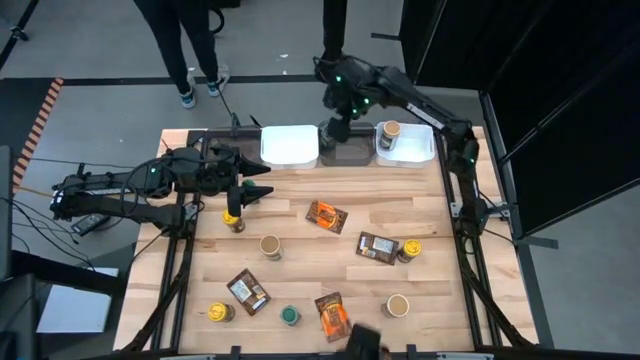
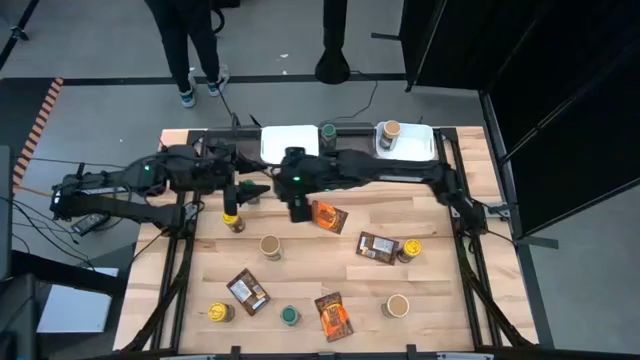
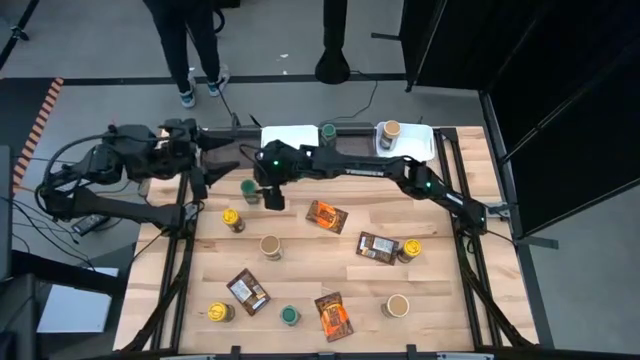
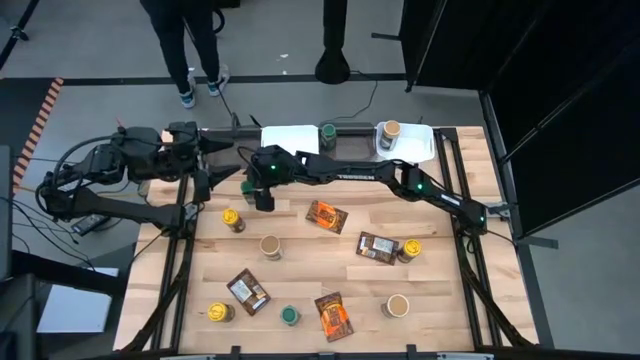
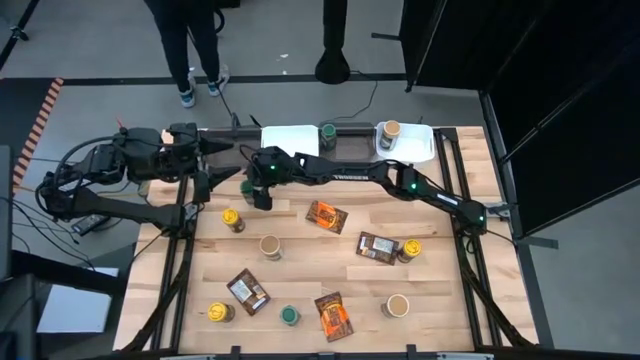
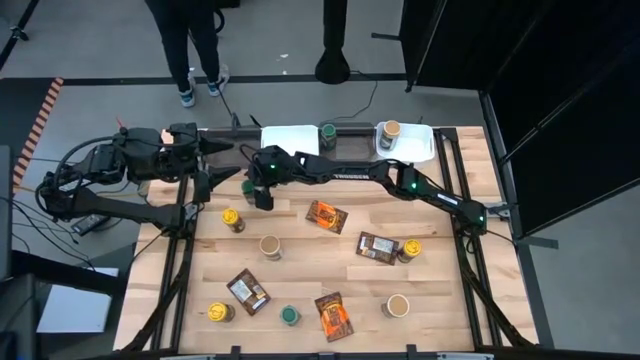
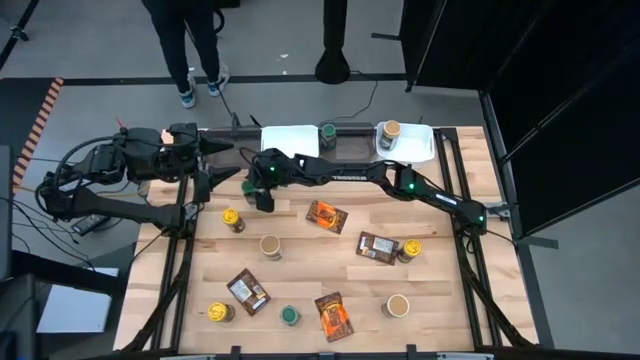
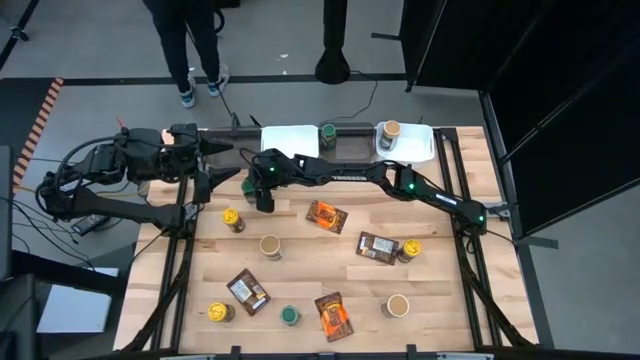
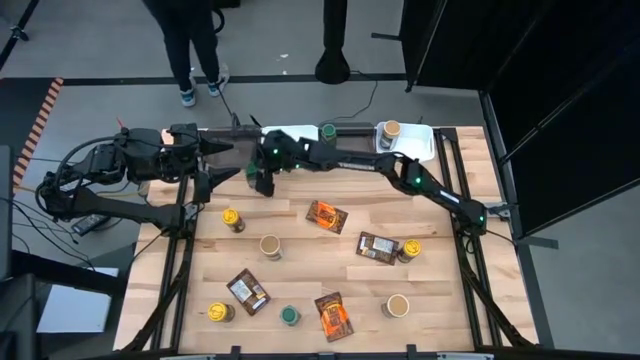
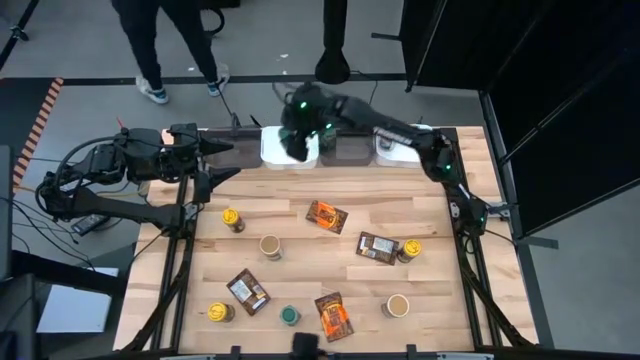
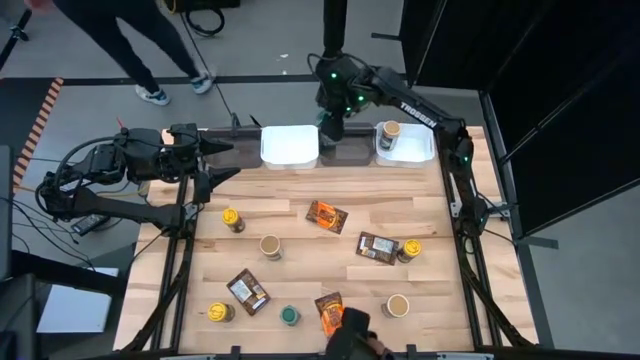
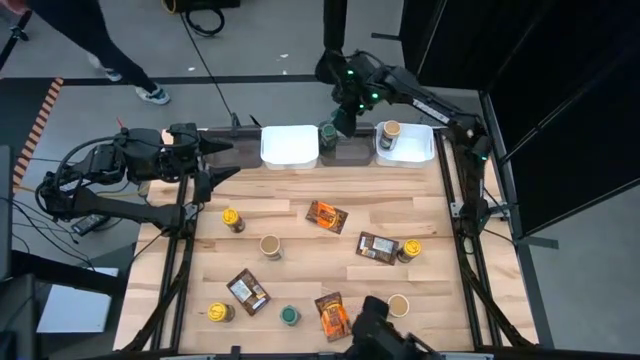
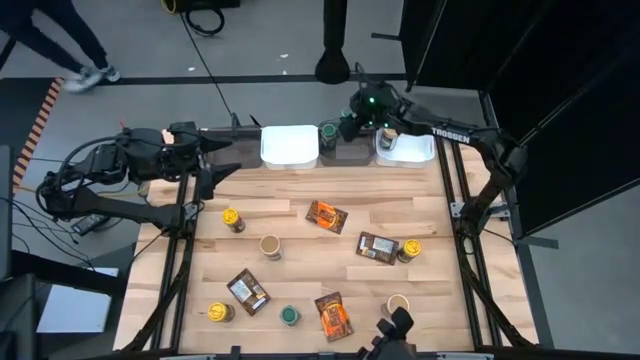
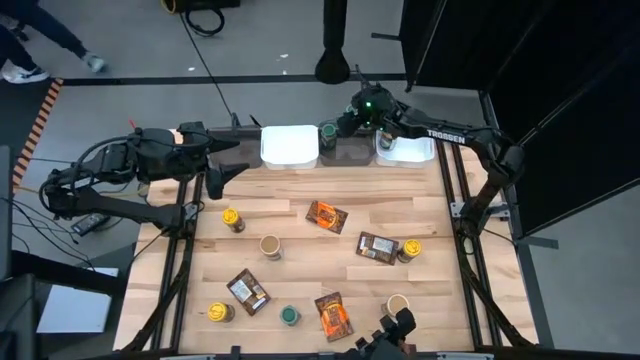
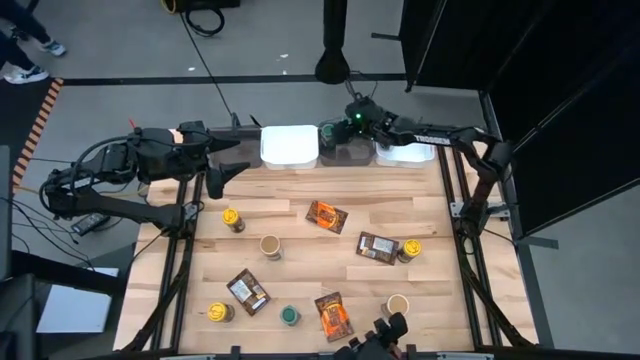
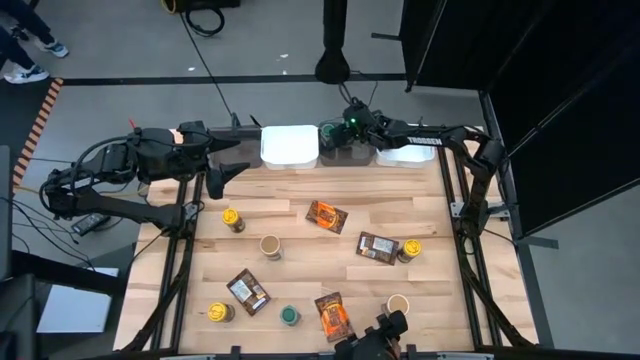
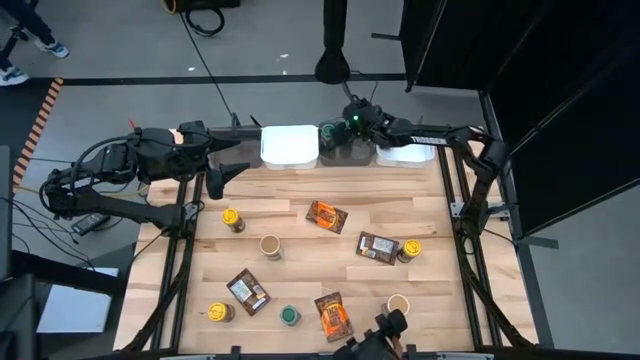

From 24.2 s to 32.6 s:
Task: Sort spices by type
Put the top green seasoning bottle into the right black bin

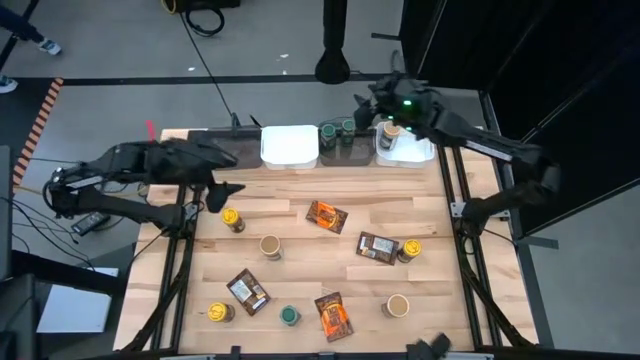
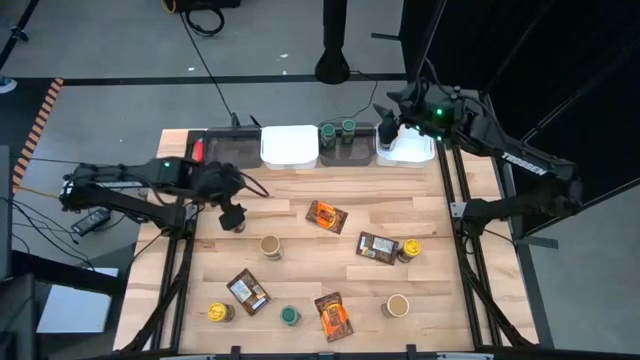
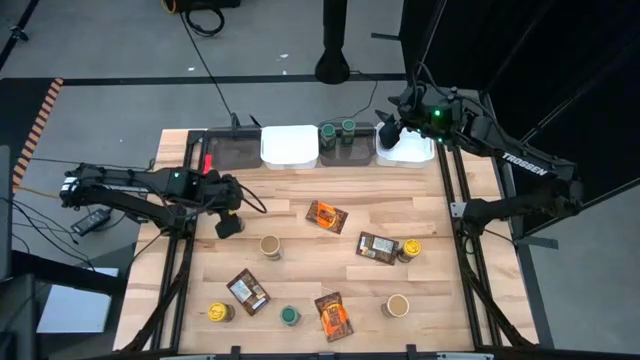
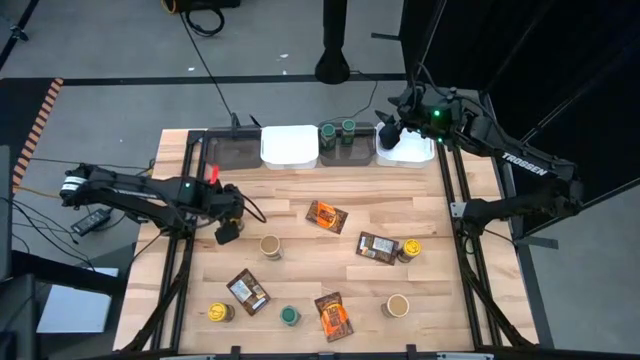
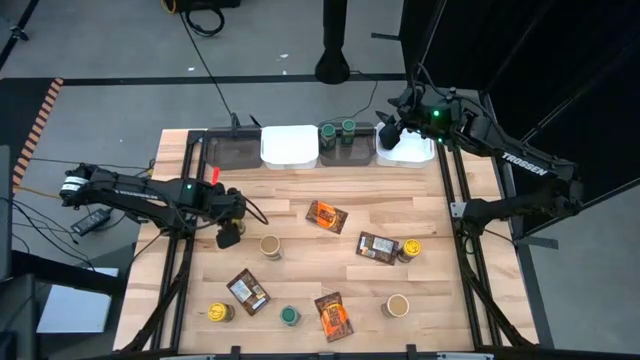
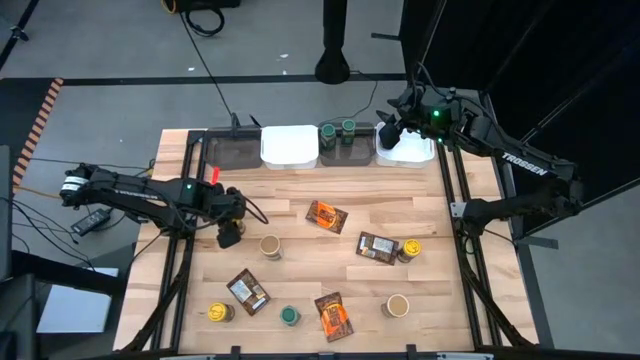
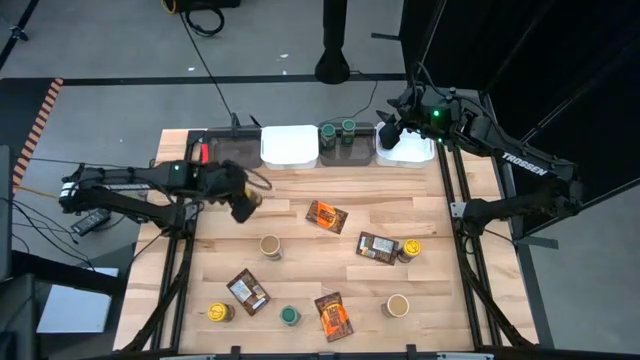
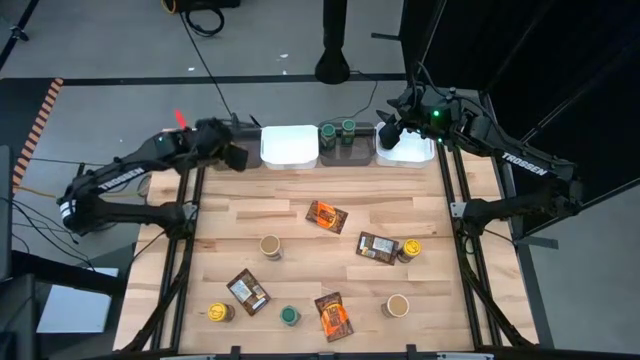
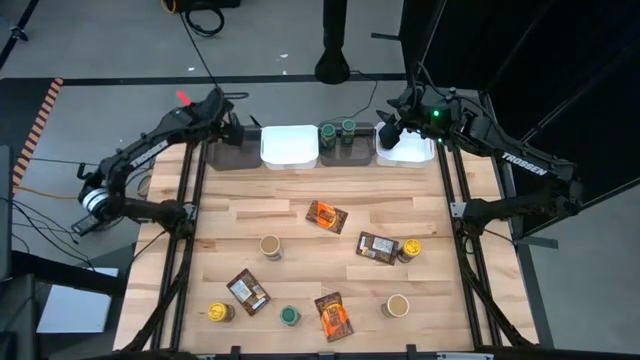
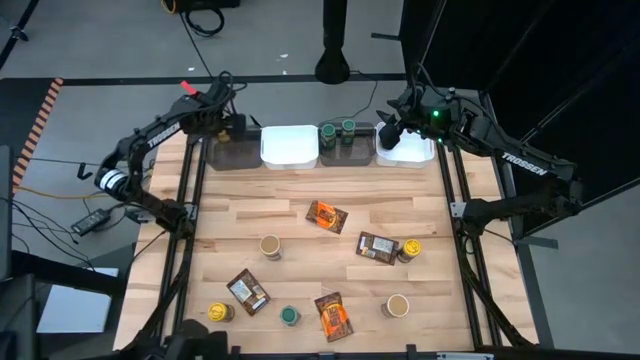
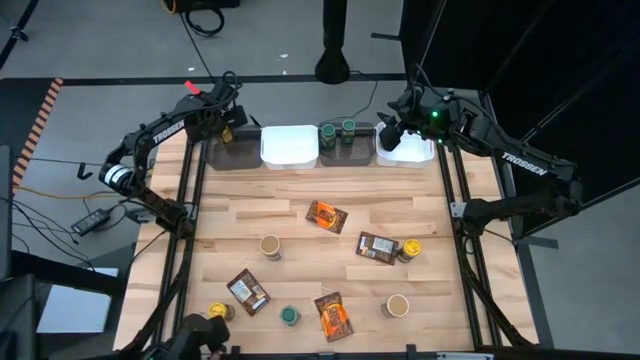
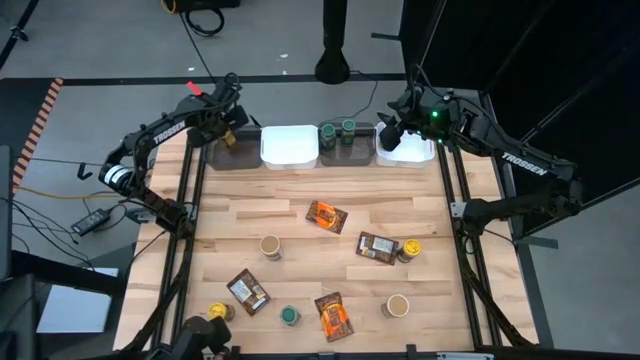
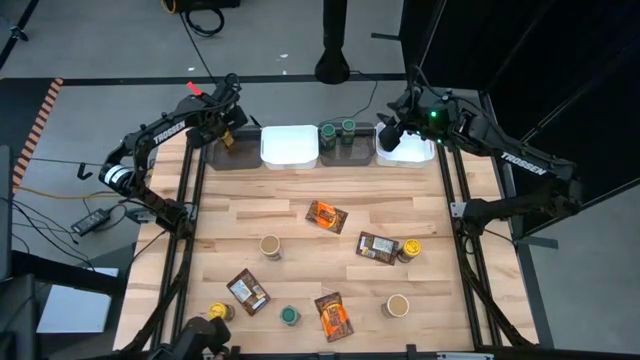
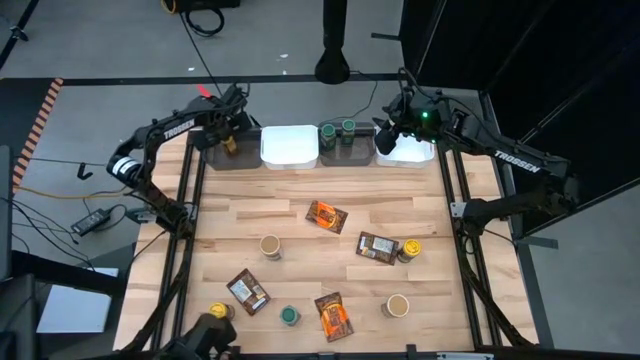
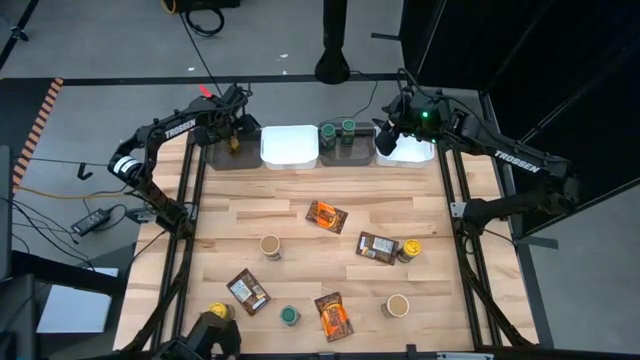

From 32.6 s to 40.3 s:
Put the top left yellow seasoning bottle into the left black bin

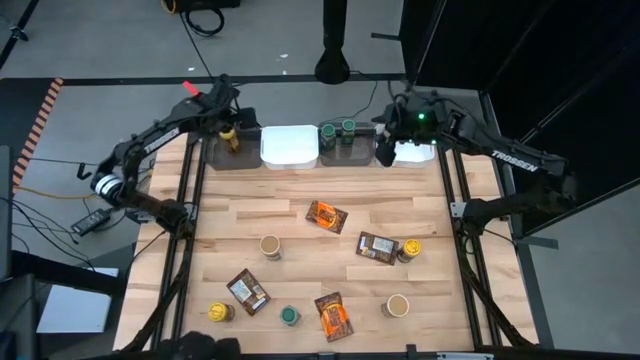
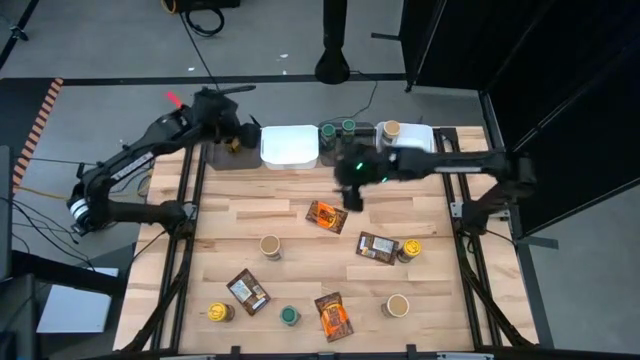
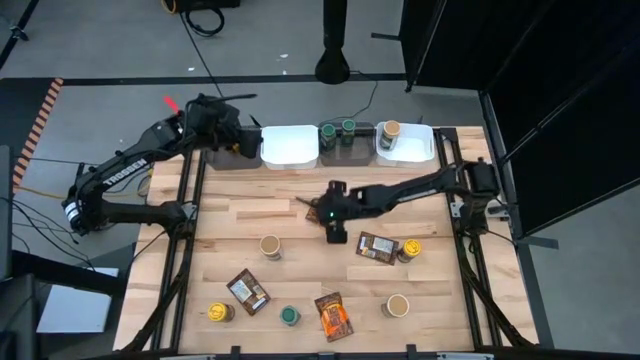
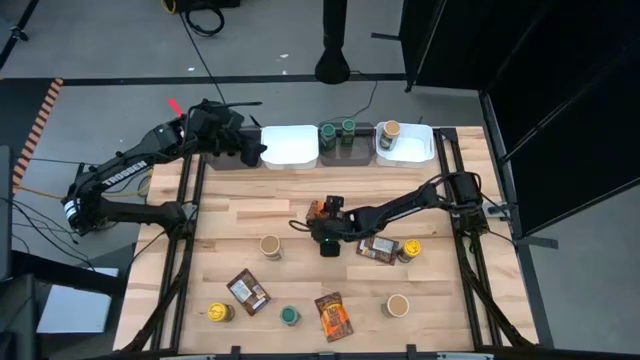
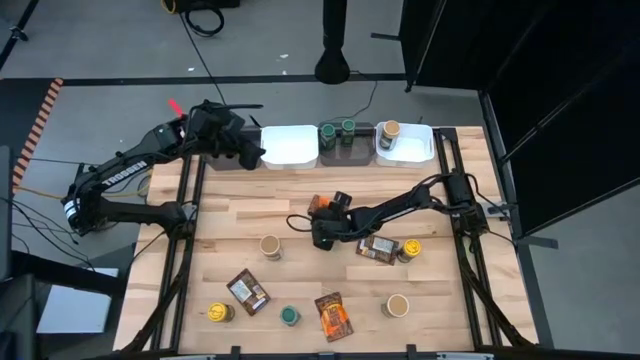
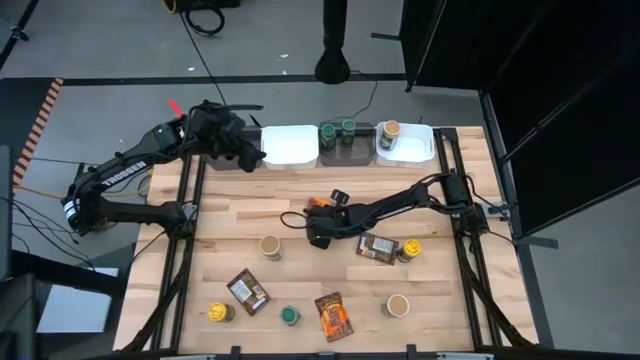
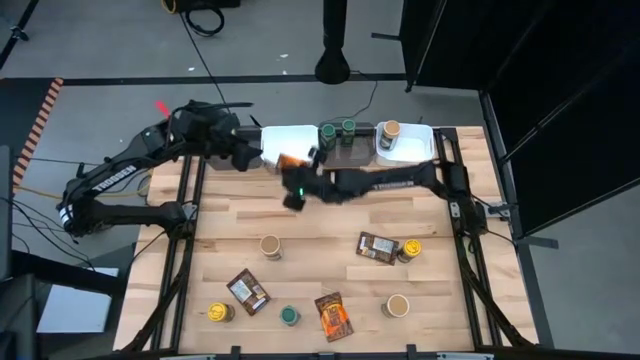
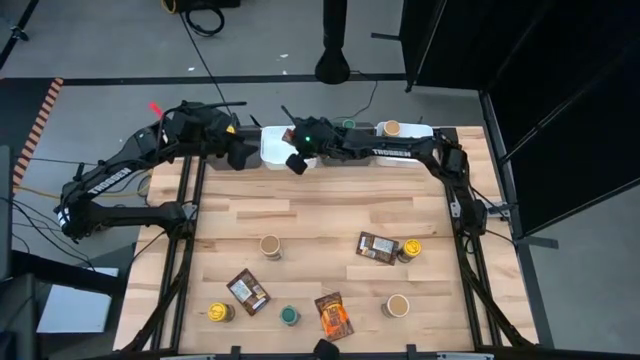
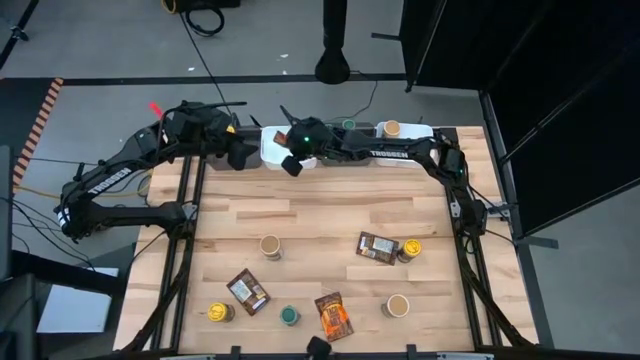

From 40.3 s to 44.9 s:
Put the top orange seasoning pack into the left white bin
